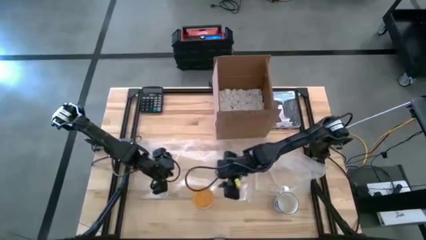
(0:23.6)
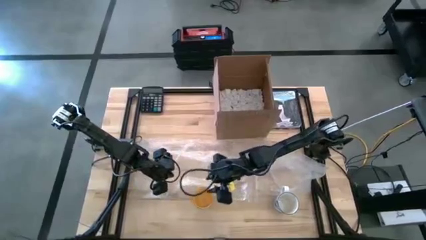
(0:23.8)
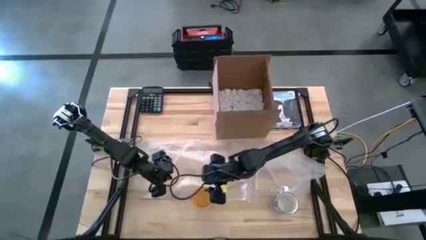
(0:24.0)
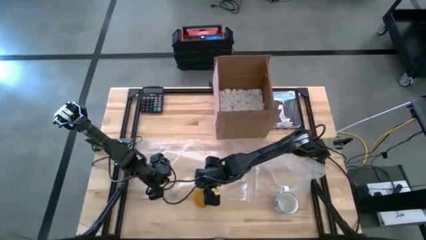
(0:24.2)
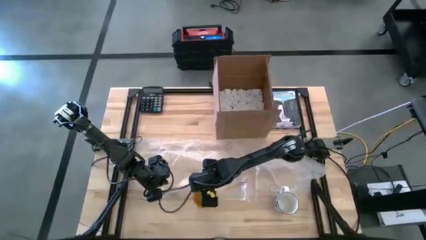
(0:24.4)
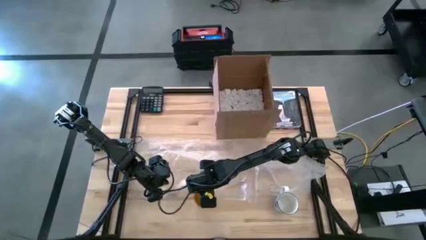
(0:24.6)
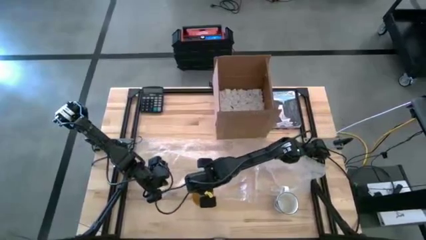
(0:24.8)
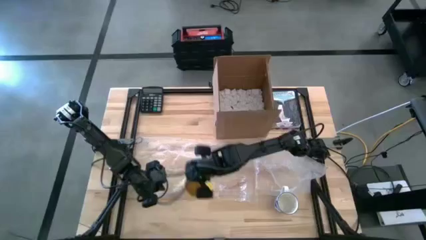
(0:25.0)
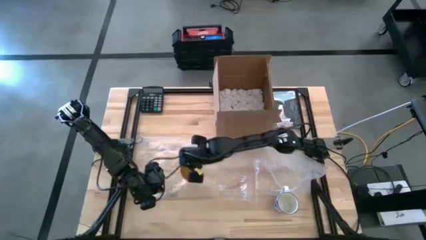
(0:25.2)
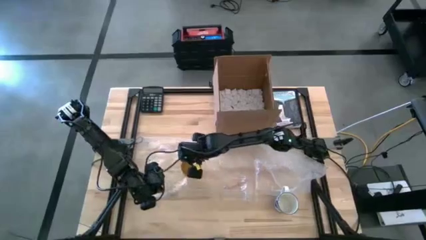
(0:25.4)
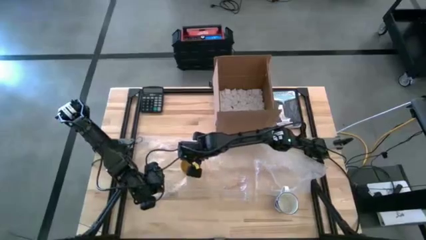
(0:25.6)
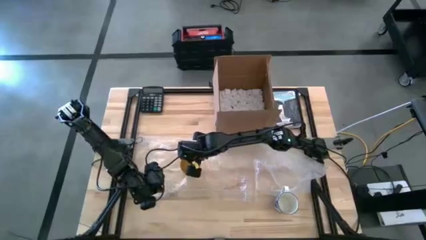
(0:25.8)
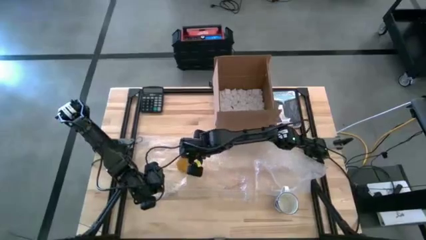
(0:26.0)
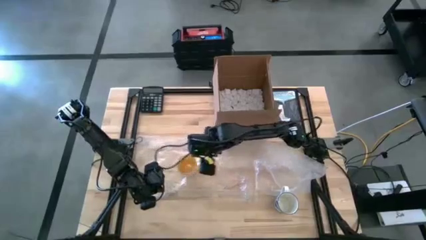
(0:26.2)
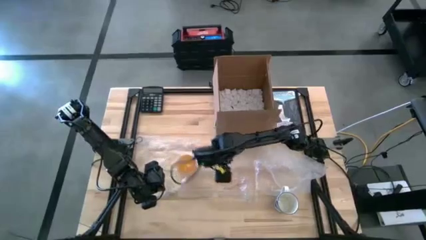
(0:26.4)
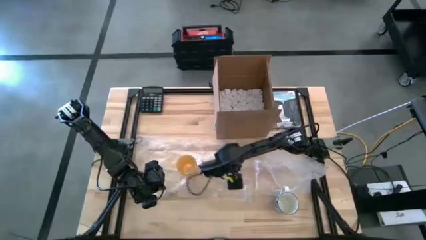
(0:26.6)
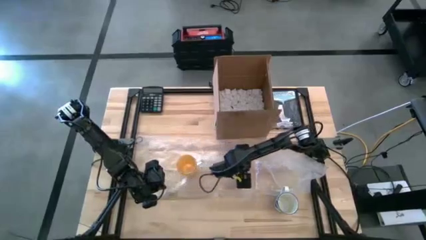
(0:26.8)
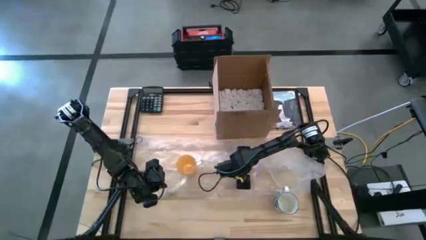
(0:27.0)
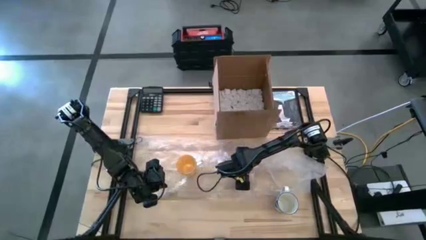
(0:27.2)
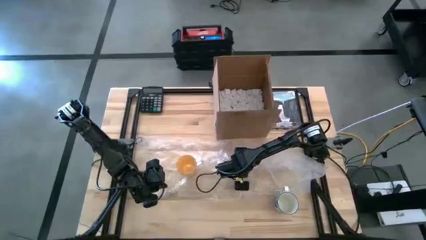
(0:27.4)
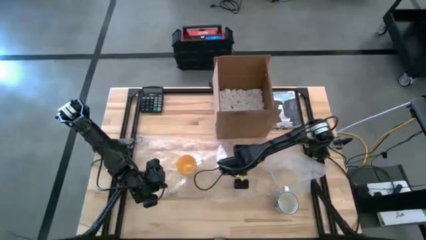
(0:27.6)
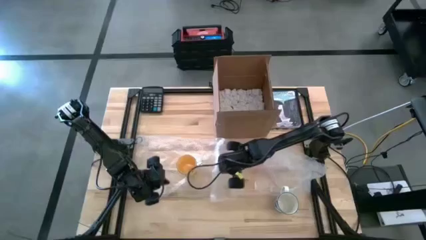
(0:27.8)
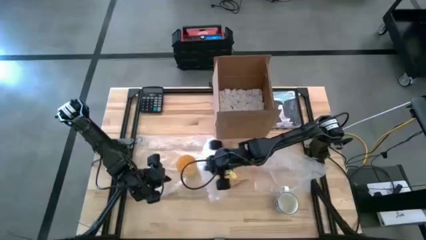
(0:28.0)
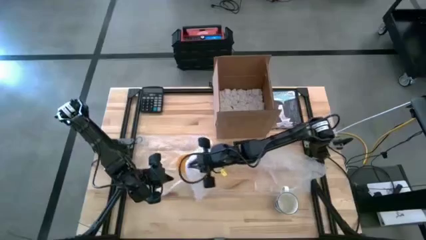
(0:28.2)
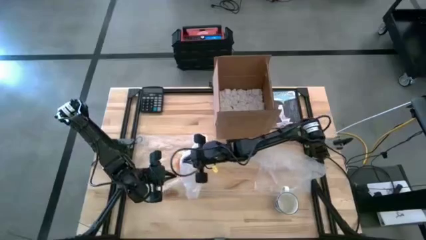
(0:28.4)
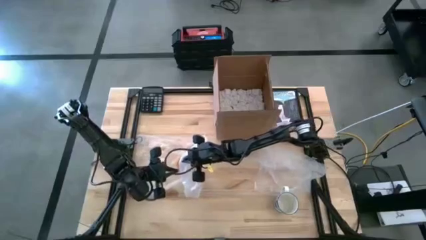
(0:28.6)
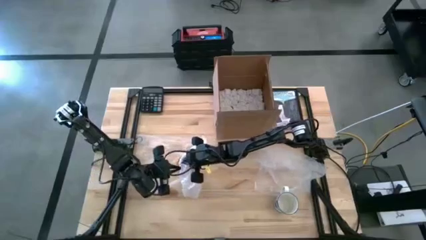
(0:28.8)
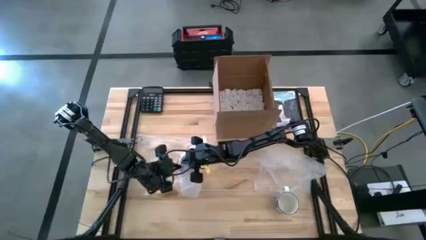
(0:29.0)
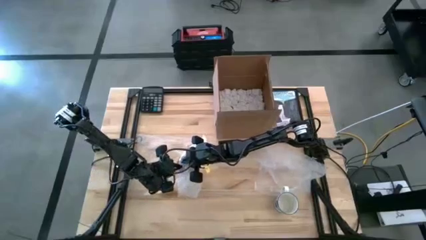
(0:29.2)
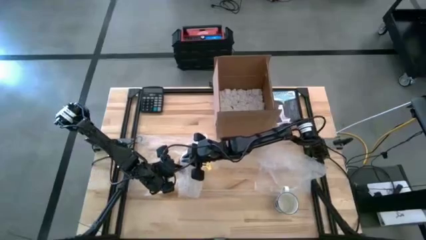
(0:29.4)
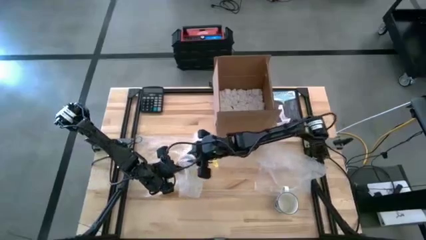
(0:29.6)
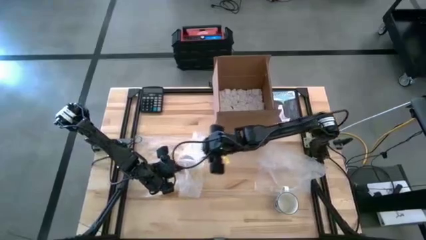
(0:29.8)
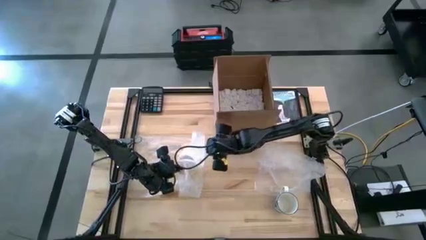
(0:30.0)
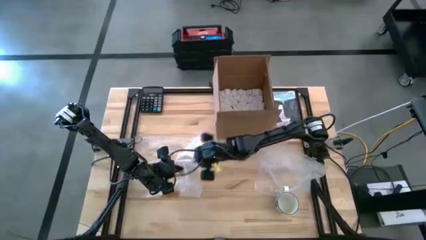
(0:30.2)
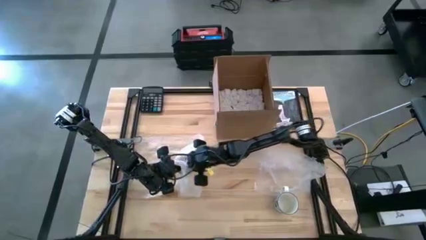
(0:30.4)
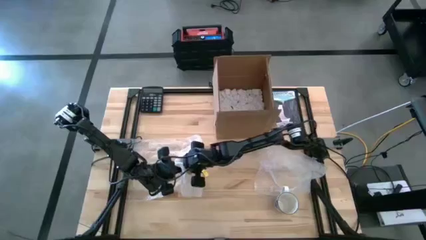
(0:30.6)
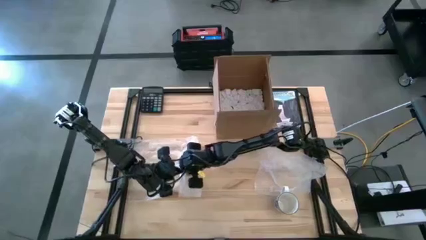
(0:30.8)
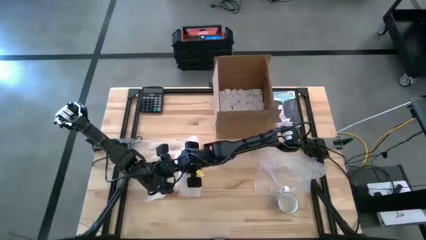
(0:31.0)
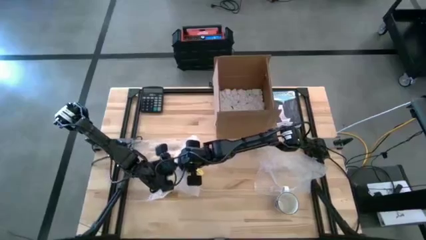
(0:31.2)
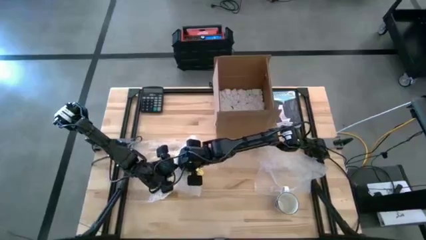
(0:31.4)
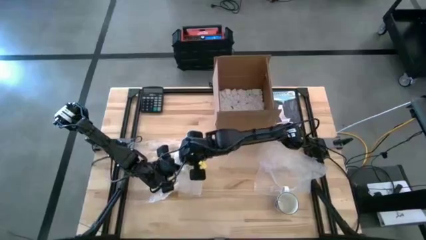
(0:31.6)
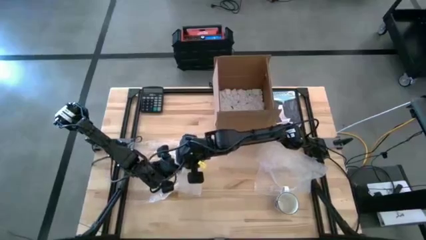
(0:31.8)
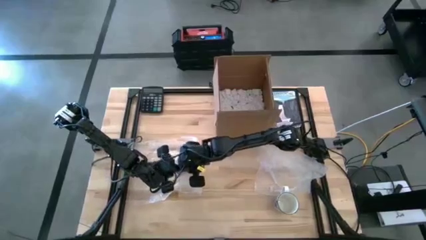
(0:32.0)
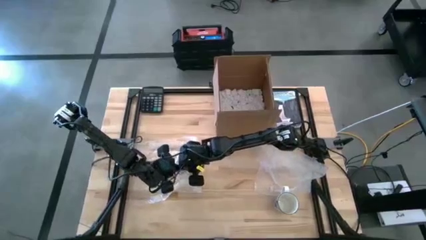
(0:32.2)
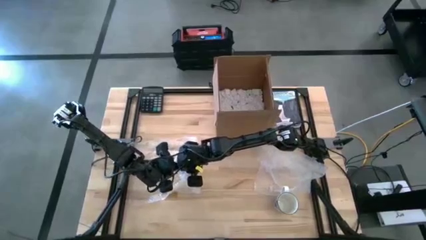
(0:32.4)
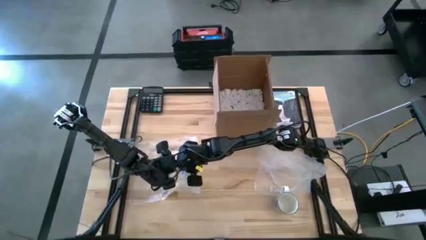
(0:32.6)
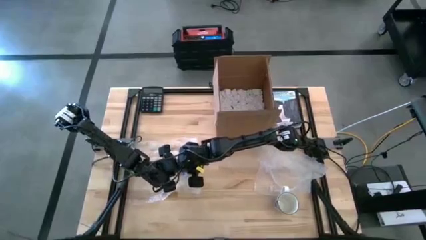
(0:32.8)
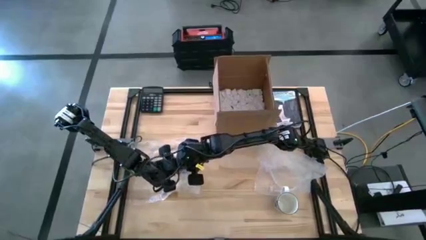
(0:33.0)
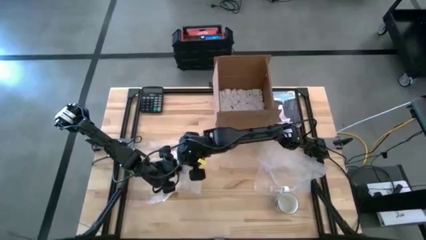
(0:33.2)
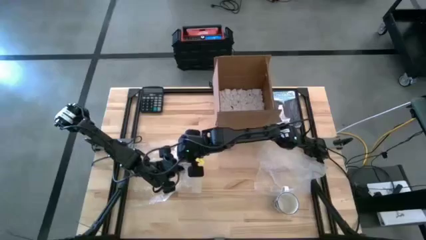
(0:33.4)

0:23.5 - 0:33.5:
Task: wrap mug
Wrap the yellow mug with the left transparent bubble wrap
